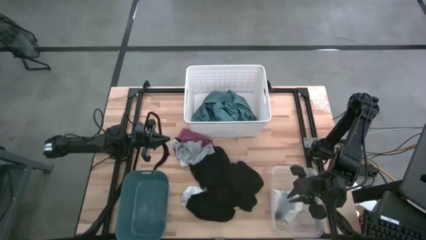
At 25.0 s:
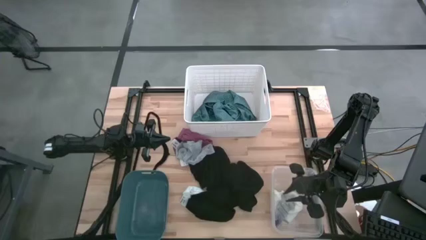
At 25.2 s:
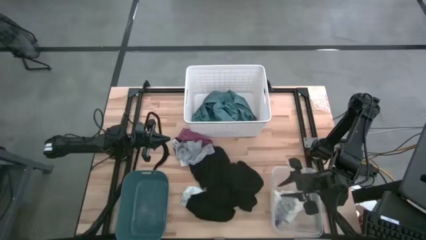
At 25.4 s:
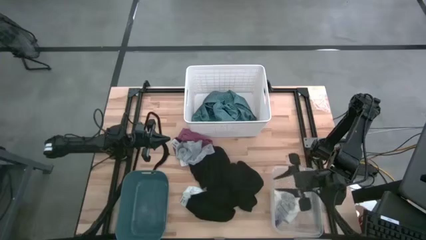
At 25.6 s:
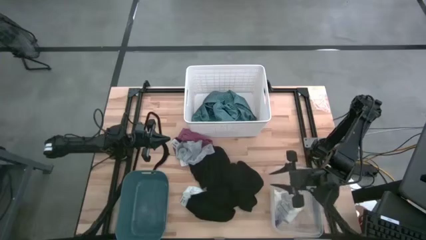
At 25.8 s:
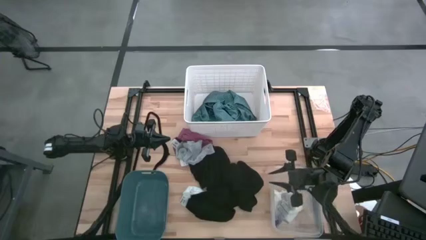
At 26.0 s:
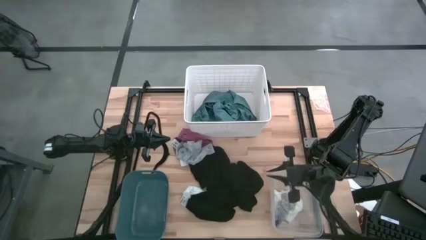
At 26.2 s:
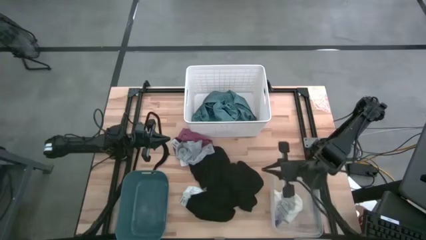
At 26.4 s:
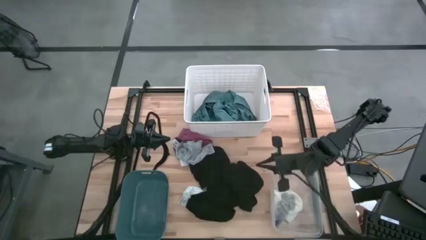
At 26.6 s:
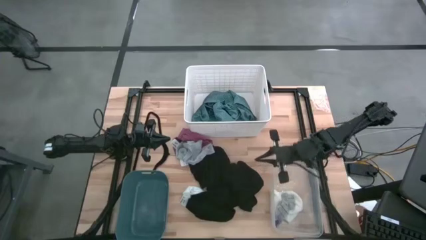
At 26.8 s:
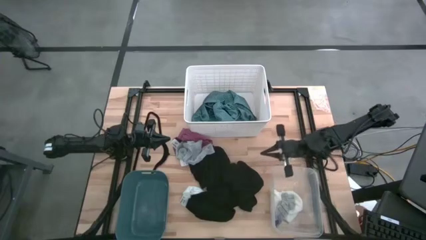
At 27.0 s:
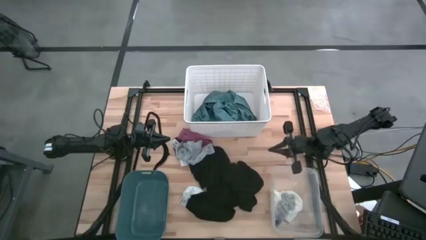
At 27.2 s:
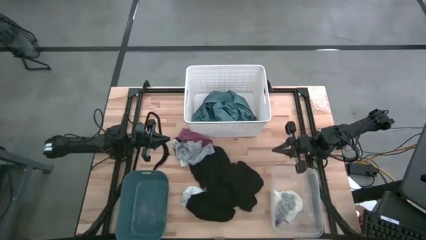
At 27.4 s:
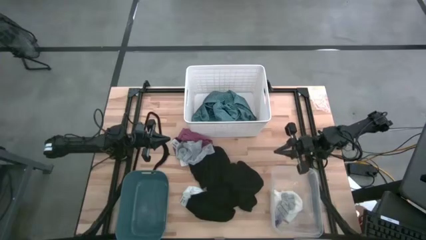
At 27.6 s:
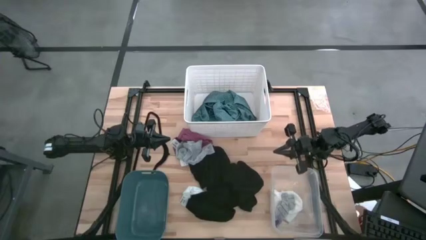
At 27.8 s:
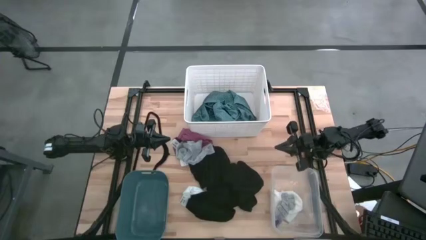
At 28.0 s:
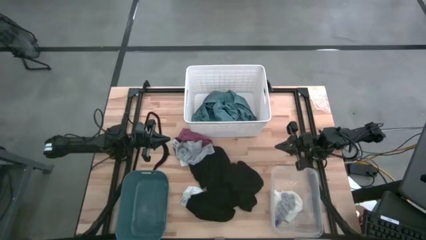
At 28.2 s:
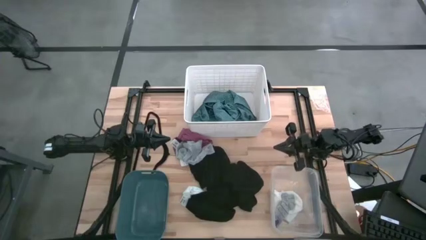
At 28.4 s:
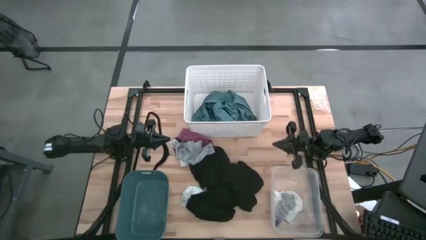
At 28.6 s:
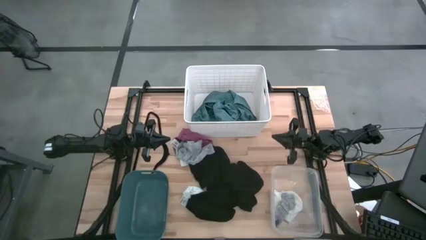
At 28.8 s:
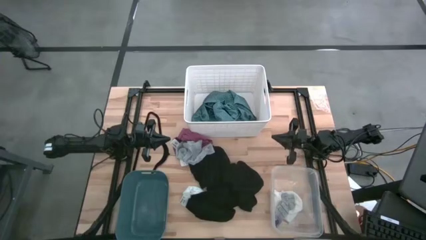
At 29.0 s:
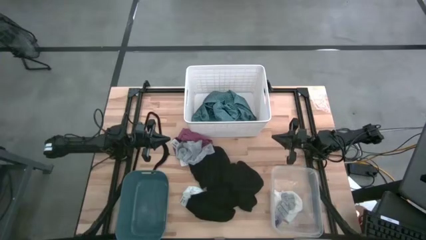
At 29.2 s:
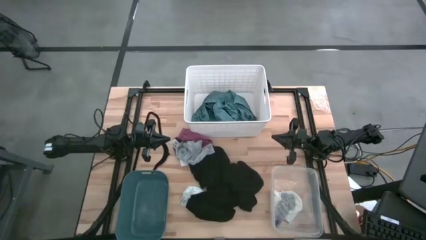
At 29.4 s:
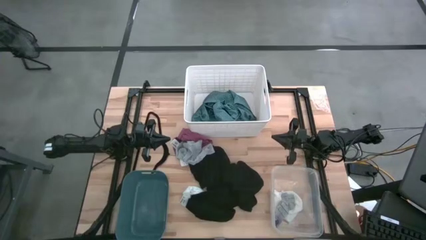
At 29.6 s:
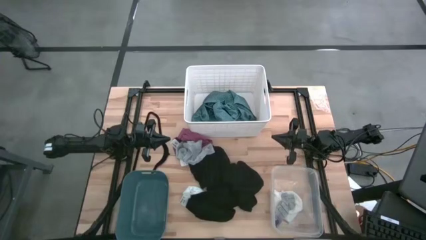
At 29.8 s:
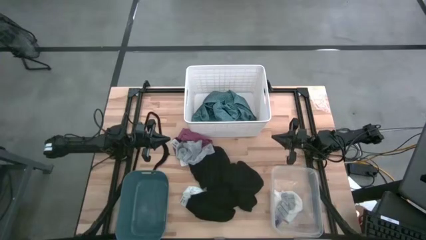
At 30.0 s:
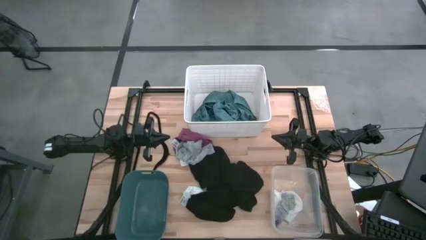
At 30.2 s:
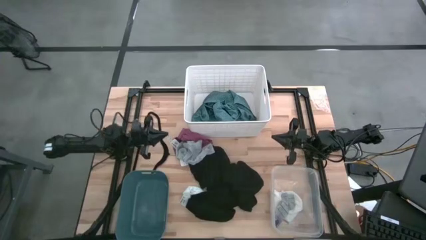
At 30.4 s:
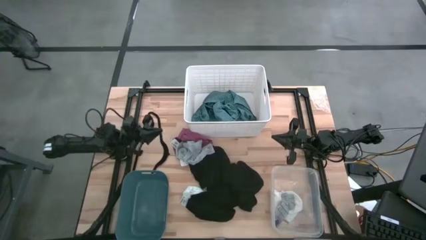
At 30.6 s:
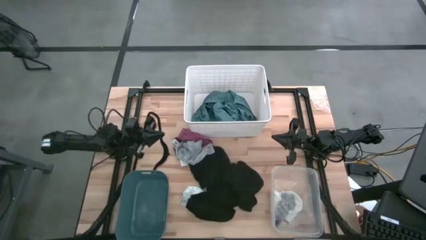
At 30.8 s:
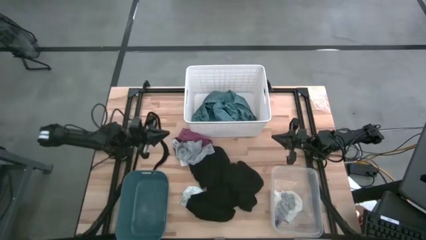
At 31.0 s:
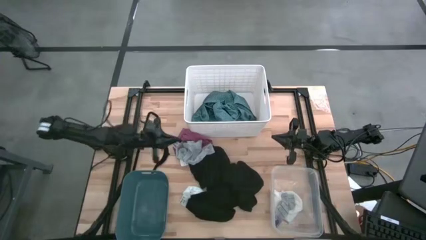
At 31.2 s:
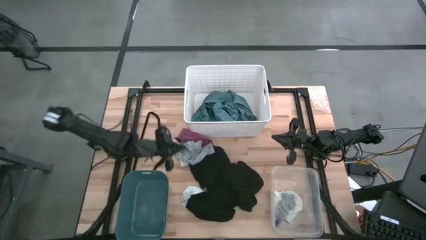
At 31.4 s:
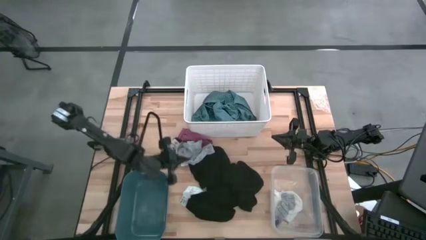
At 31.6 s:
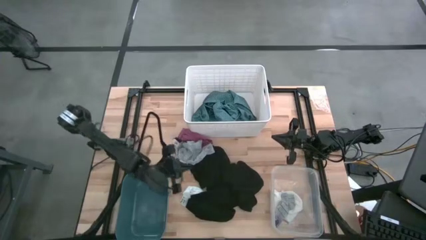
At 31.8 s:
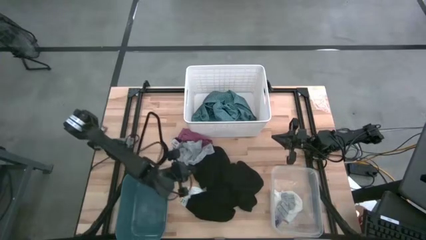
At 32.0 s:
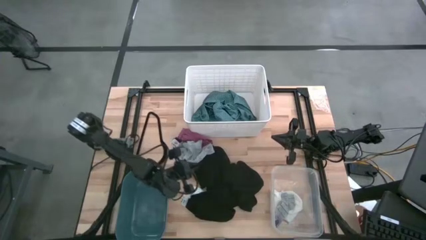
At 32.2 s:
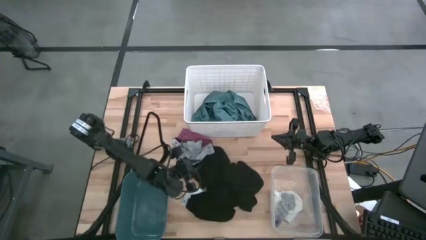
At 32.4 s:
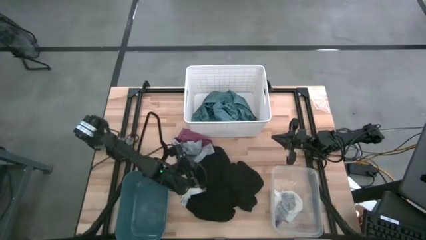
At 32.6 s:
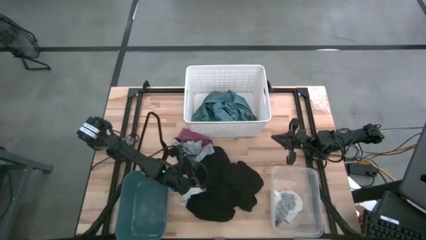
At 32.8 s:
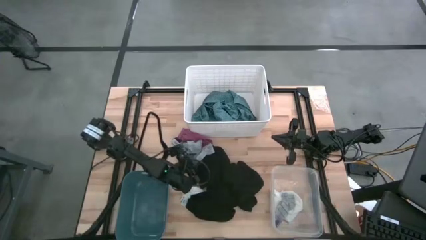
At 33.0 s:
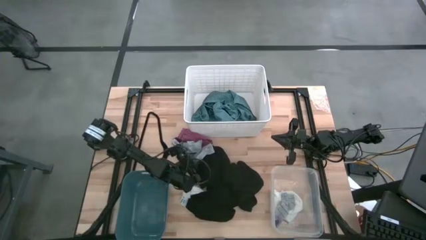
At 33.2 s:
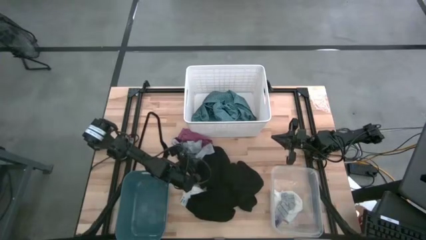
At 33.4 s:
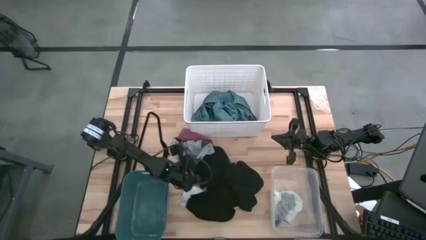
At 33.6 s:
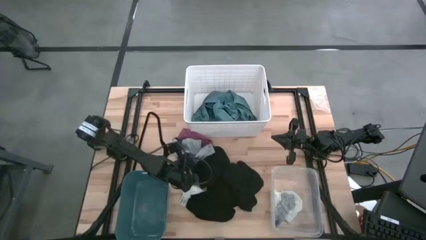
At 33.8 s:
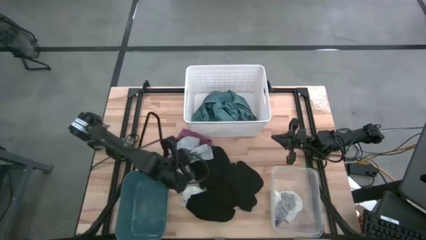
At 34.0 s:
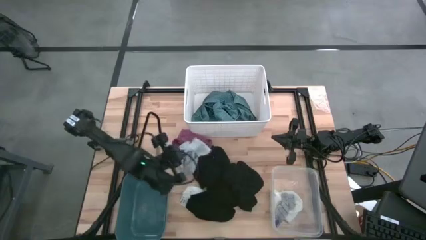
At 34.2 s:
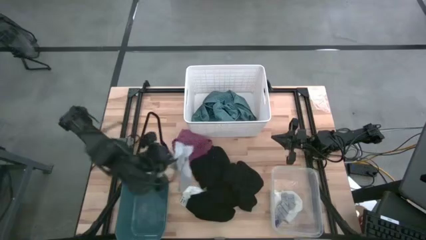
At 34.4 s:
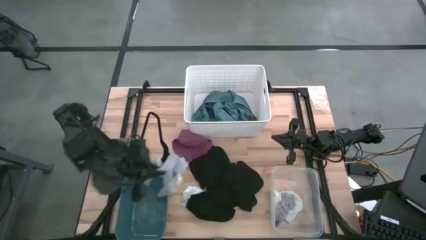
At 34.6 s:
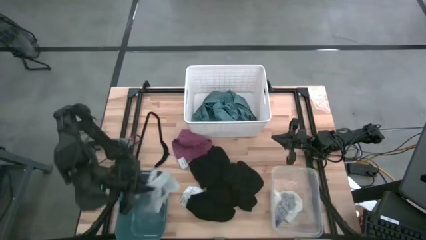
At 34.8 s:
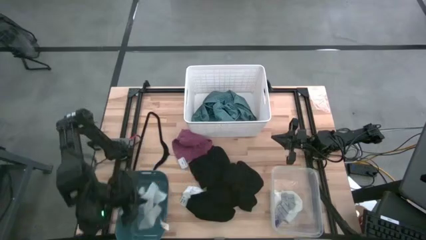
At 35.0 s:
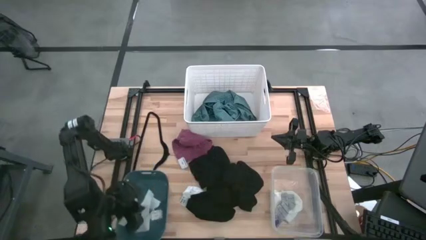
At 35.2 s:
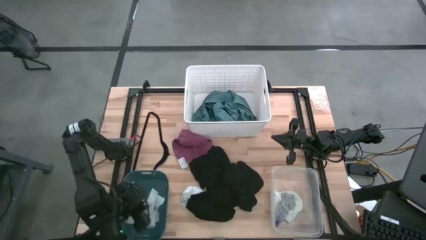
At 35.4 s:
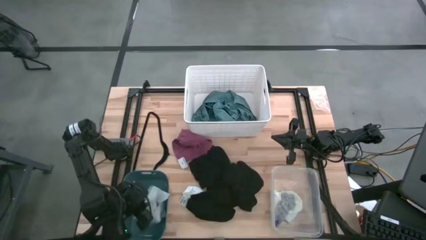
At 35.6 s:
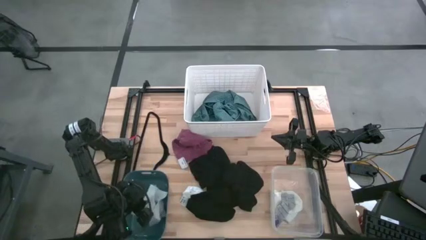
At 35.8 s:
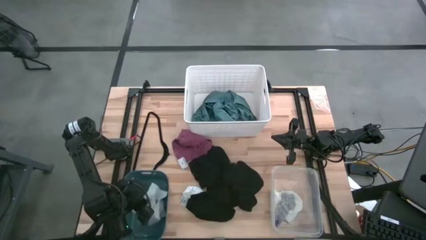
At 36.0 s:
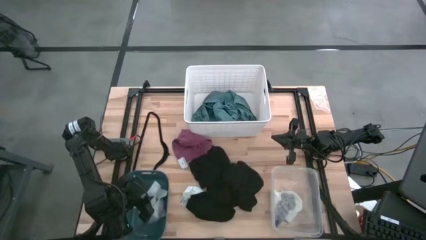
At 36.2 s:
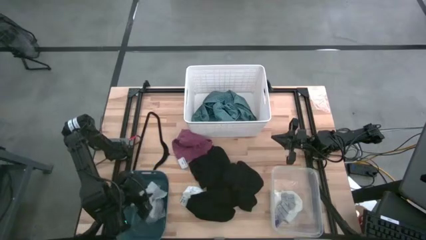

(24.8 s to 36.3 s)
Task: Pick & Place Cloths
Put the gray underwear into the blue bin

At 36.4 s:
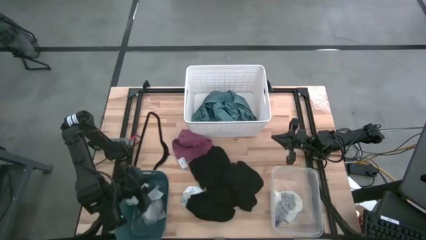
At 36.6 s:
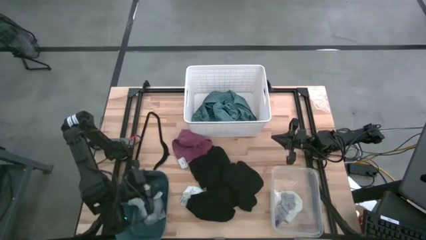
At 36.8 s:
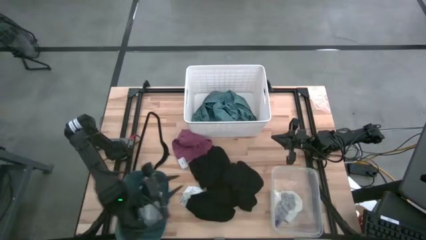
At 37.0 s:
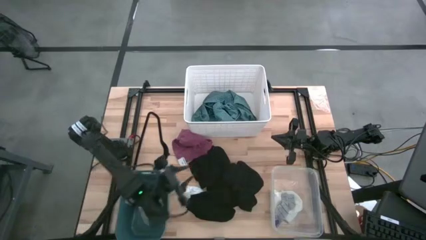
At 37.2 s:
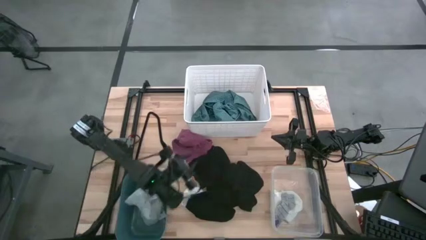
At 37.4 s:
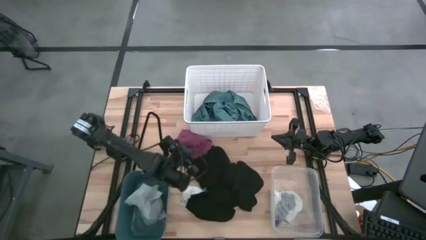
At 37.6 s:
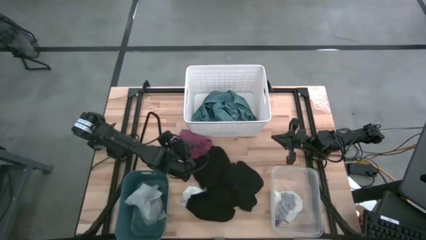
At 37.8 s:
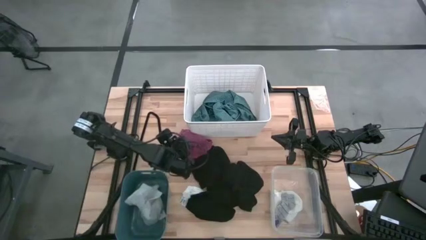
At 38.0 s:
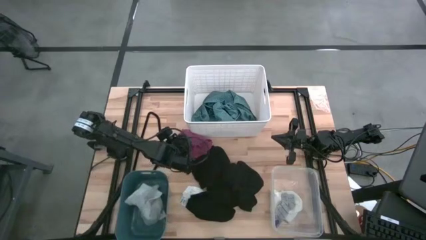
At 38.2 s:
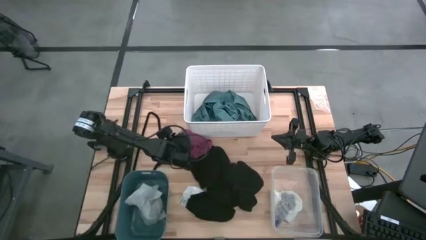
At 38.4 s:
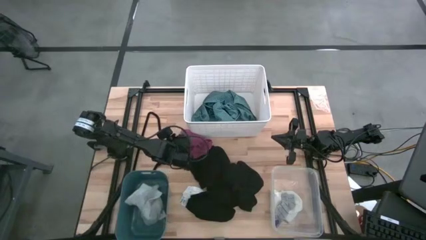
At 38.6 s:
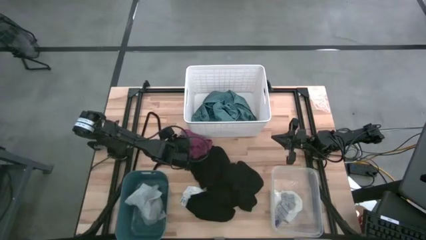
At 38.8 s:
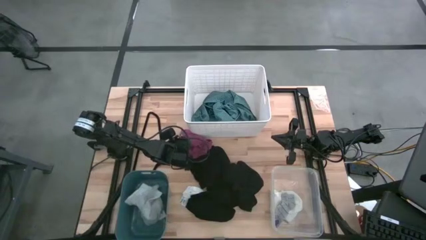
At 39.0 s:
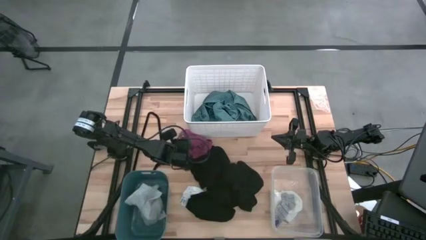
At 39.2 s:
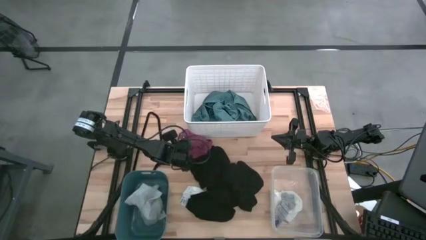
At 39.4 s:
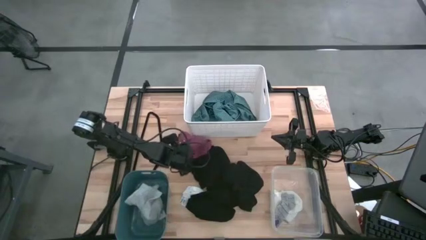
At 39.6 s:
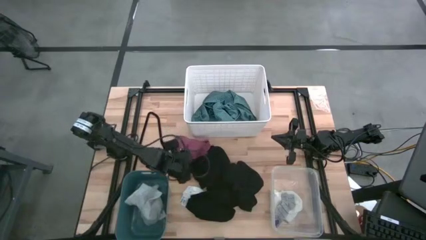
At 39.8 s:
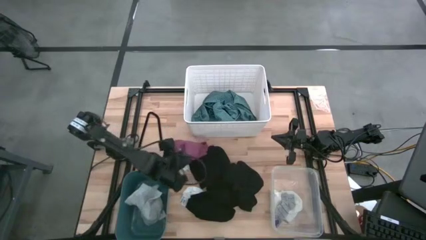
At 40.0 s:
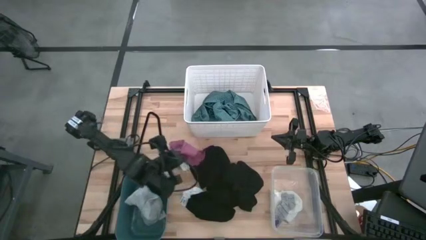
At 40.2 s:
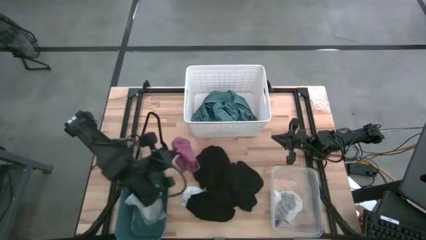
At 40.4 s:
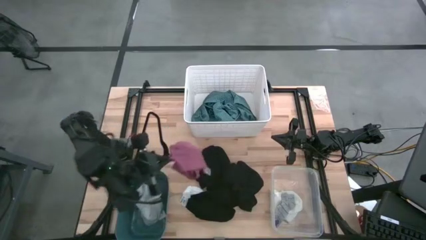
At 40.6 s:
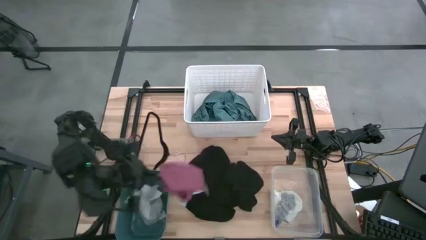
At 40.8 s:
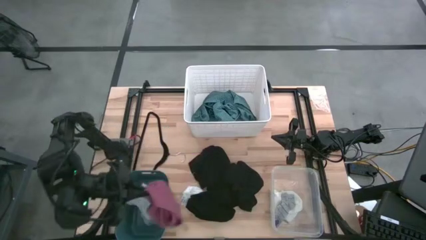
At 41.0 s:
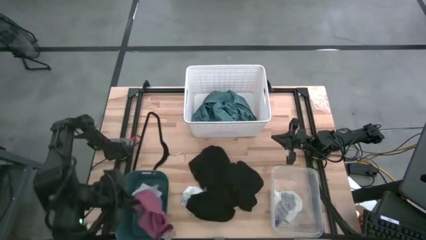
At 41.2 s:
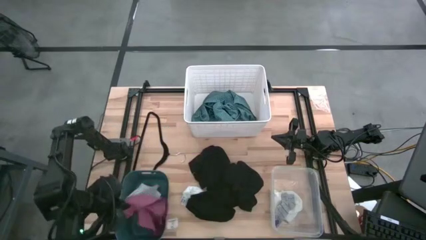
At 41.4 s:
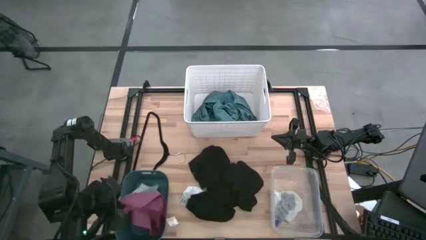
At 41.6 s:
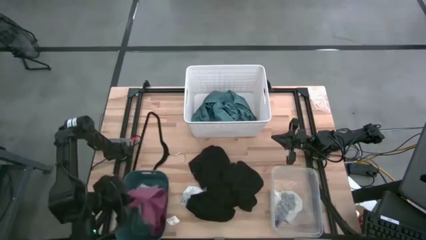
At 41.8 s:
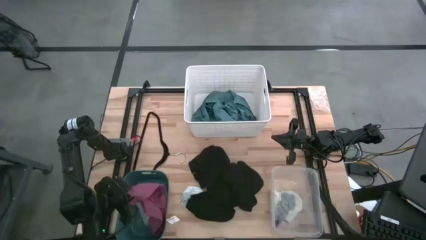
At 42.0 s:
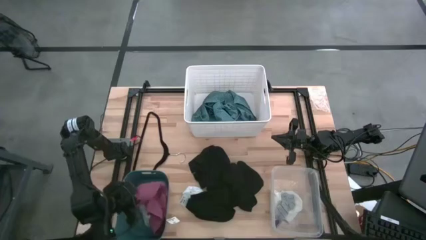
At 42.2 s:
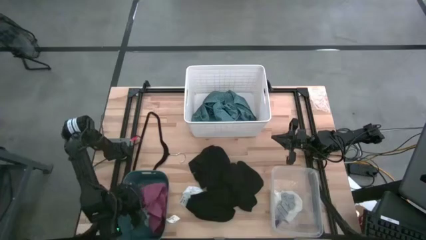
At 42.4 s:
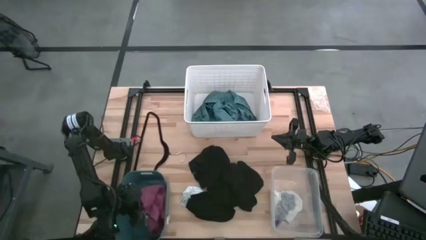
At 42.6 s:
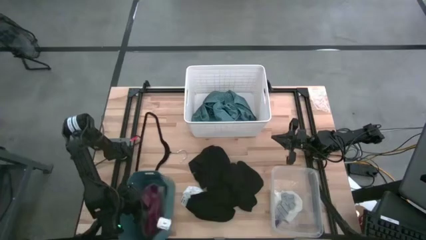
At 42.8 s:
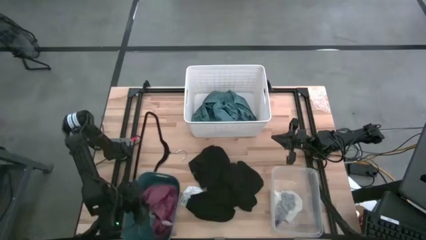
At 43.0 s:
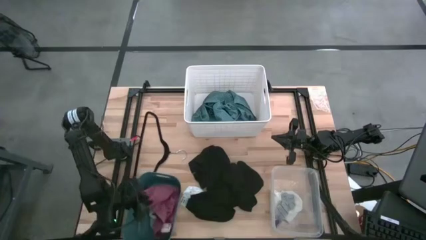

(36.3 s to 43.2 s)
Put the red underwear into the blue bin
